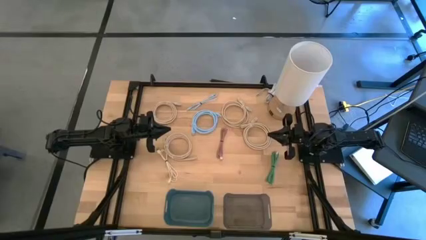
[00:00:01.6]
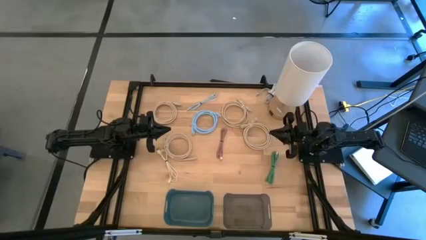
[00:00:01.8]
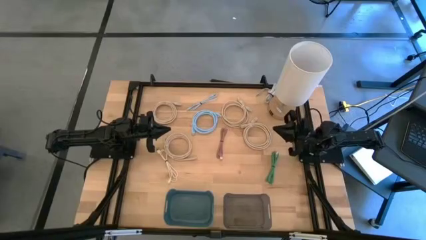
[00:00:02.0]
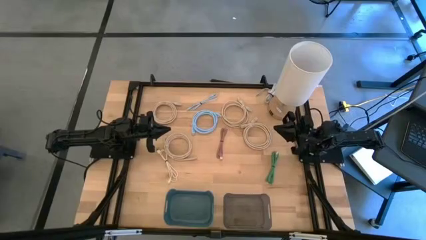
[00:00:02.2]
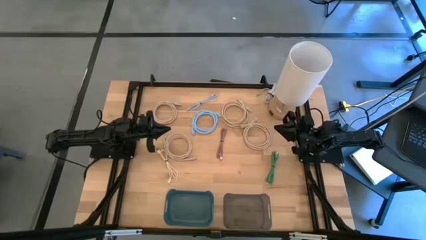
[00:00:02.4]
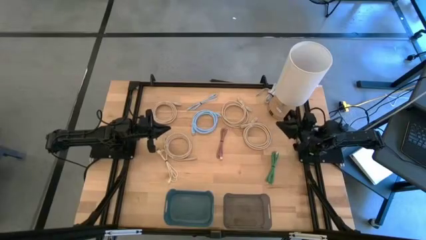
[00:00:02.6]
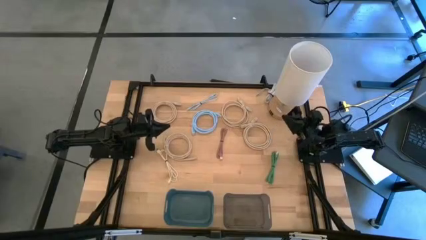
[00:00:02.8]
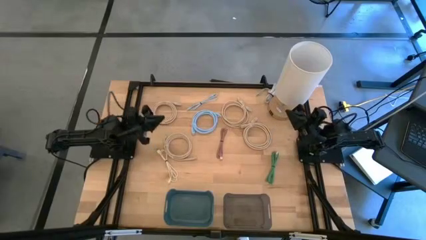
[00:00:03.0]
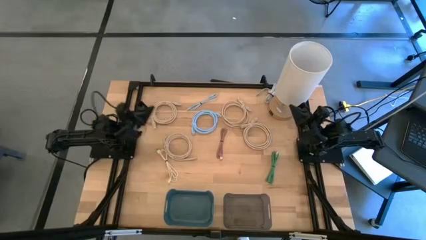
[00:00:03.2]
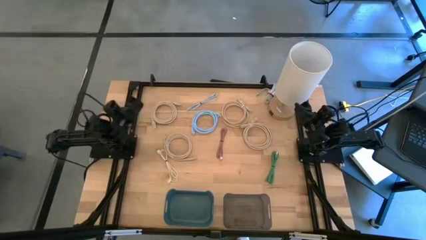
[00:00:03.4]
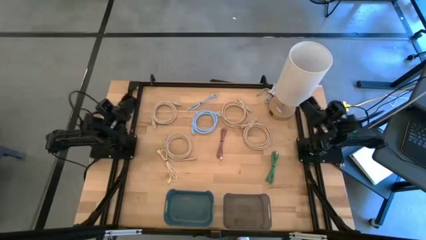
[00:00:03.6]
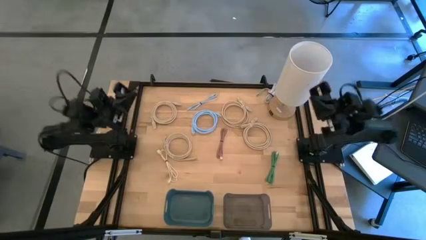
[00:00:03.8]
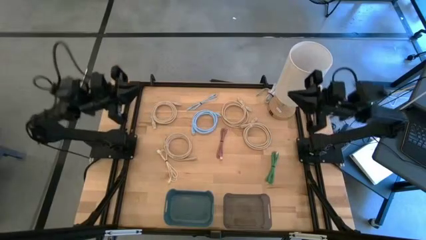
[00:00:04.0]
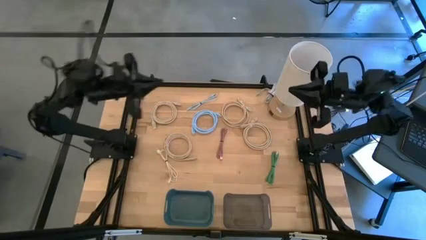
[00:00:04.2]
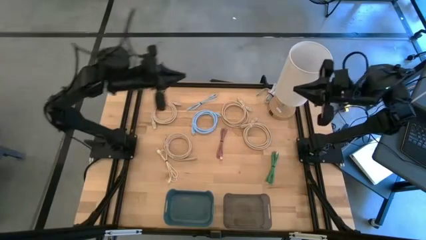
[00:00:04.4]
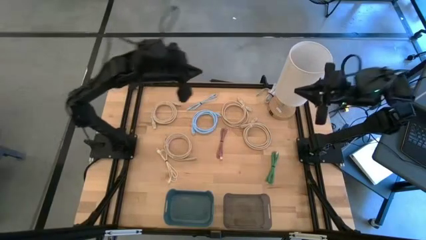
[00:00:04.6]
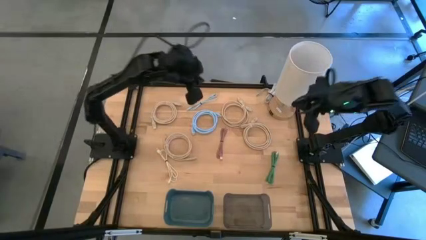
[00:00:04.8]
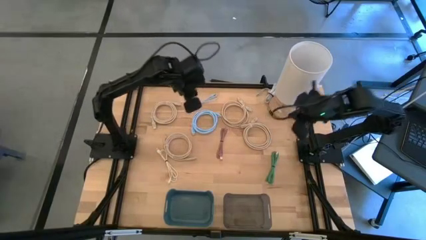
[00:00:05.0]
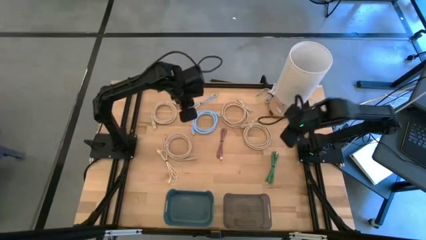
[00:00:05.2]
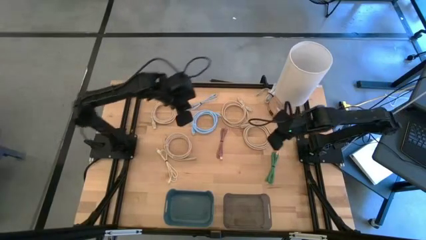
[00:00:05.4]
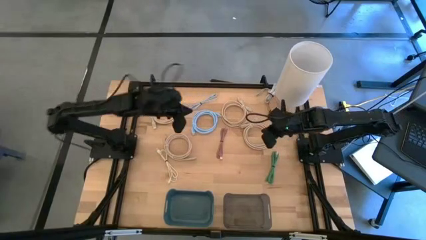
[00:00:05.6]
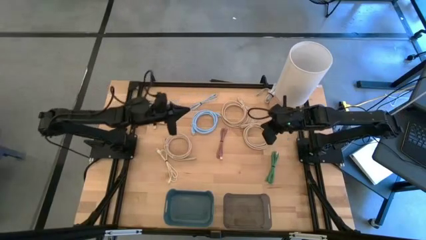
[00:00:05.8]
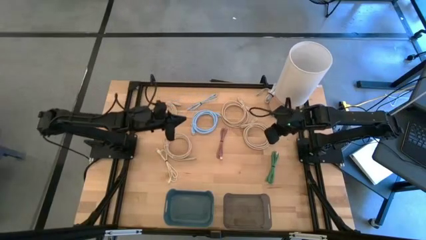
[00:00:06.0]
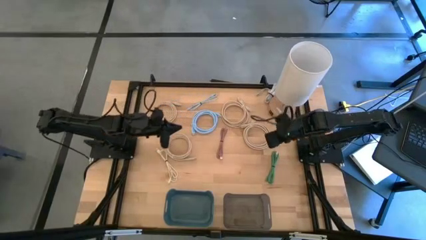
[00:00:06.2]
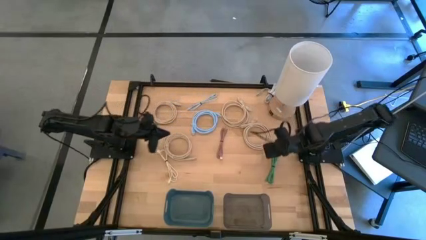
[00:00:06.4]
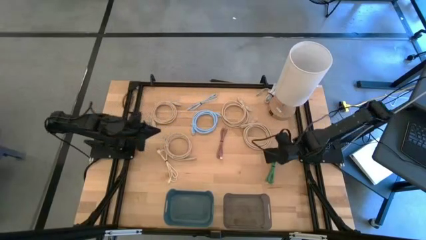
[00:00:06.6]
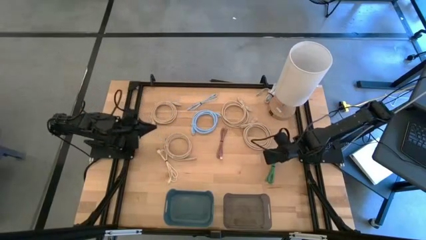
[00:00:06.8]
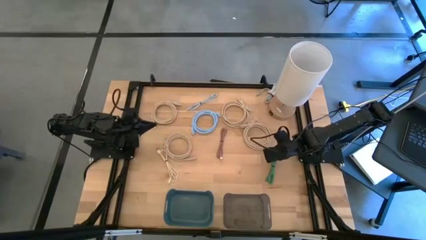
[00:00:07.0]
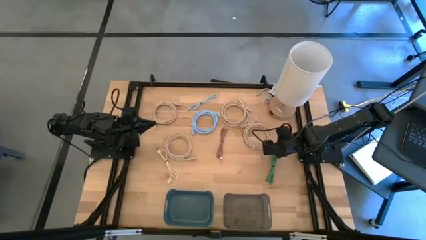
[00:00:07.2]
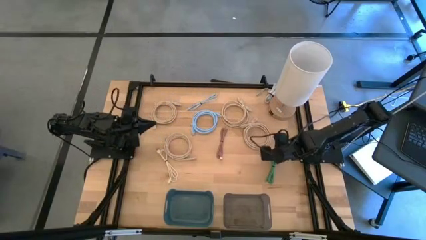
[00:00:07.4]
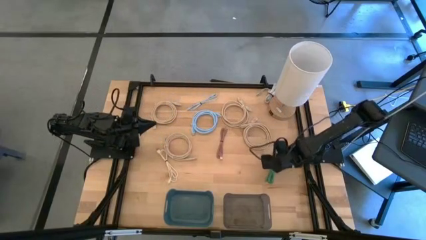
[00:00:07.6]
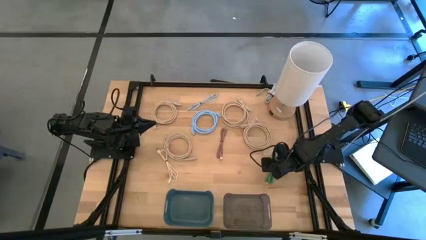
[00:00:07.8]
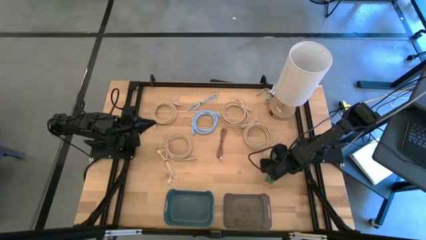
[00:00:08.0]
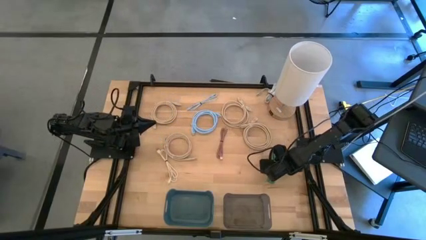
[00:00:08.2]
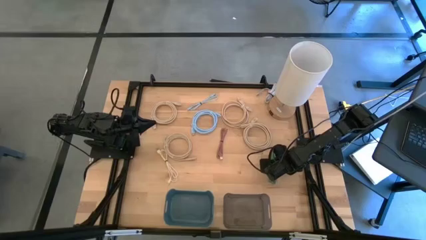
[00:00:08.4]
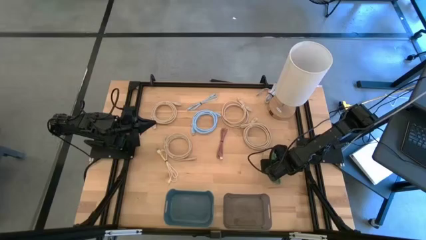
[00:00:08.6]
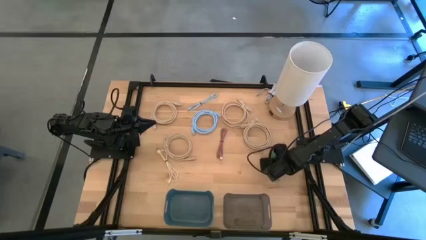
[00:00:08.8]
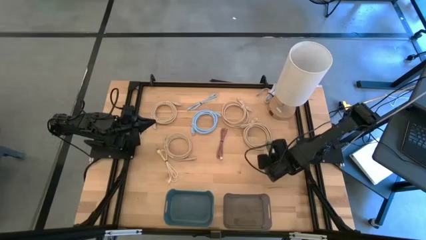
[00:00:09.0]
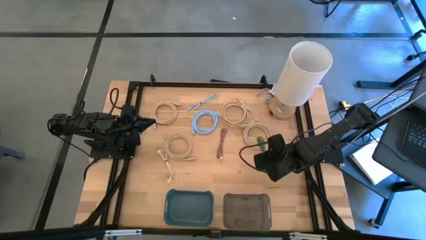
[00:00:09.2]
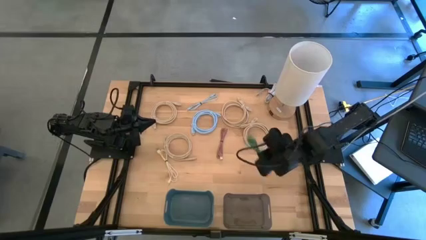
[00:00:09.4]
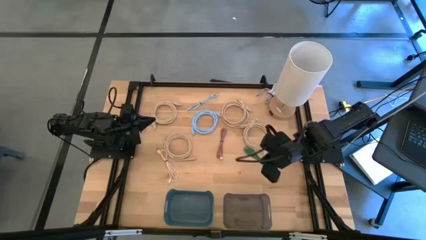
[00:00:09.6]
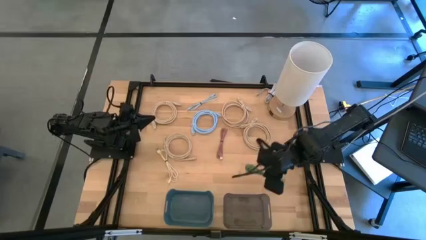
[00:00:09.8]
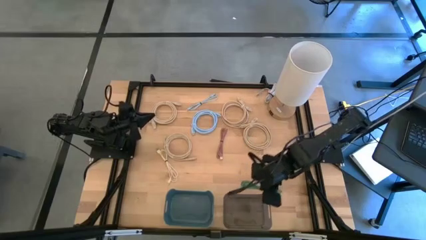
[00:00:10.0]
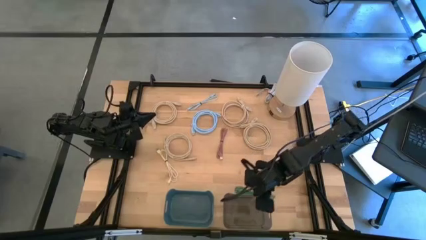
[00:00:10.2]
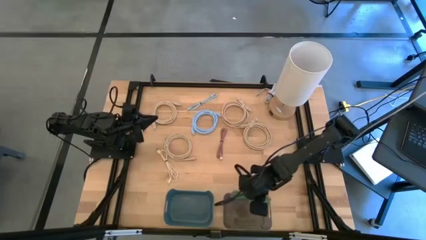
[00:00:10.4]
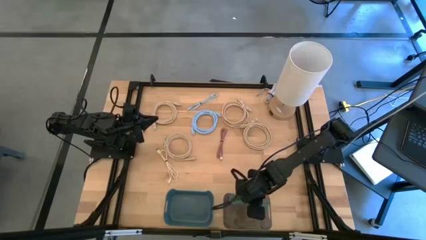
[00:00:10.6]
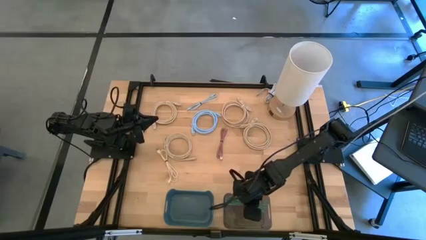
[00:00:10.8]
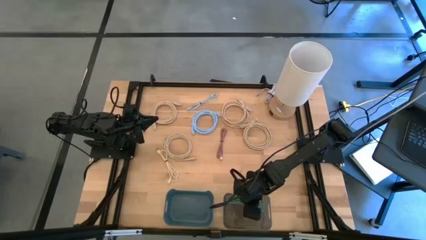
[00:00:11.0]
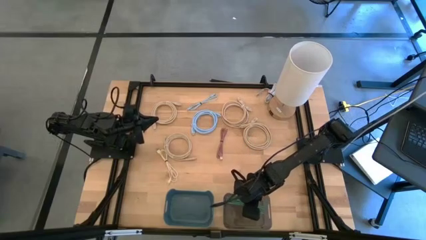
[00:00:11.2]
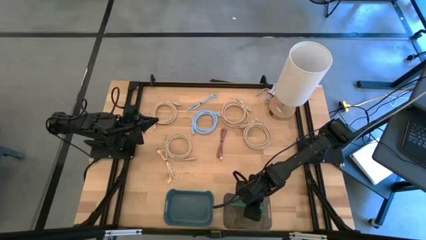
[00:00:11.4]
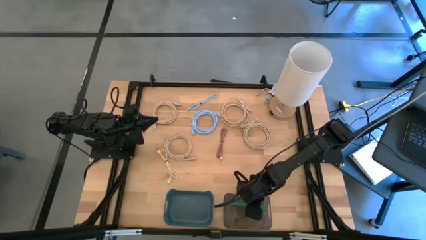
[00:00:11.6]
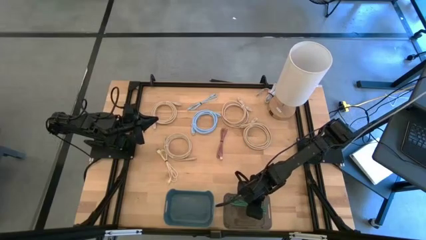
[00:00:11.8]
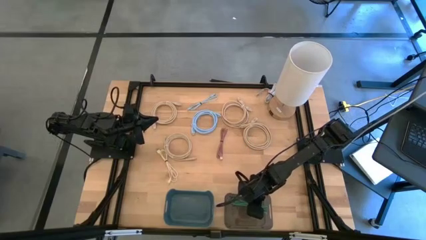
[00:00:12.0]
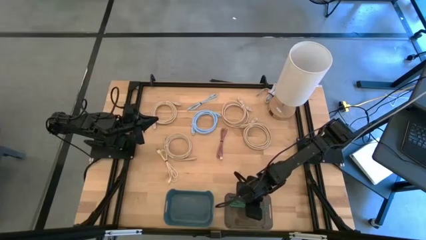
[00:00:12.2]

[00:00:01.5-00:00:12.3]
Put the green charger cable into the black bin
